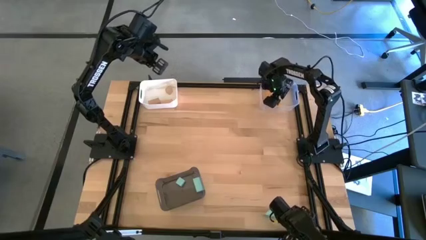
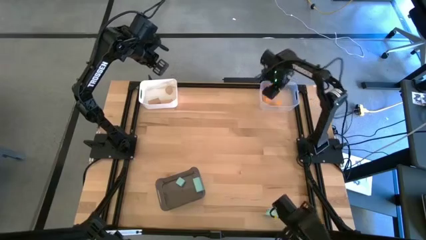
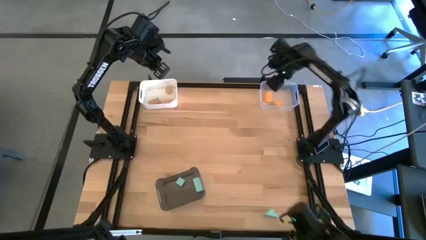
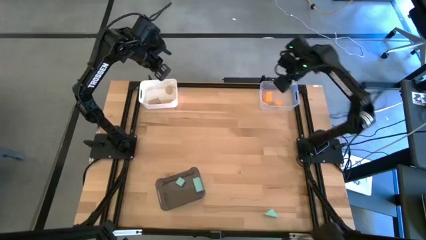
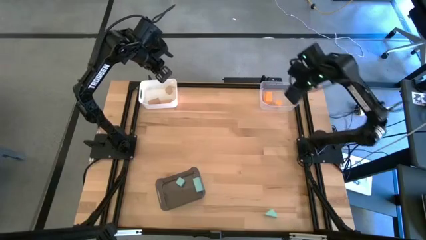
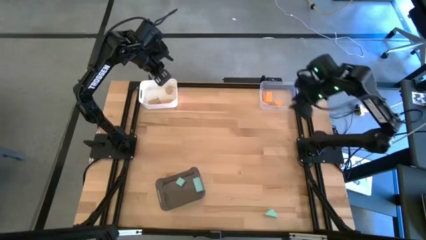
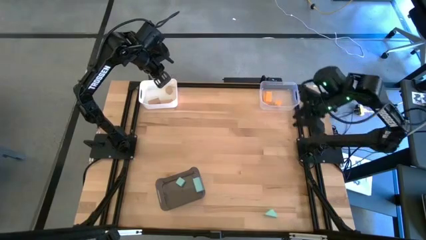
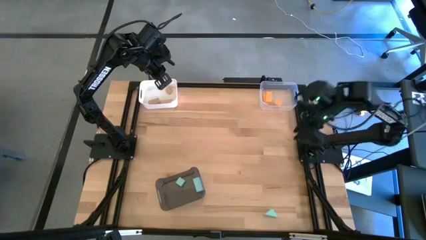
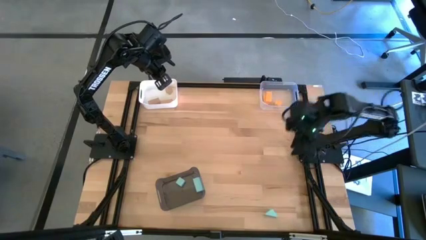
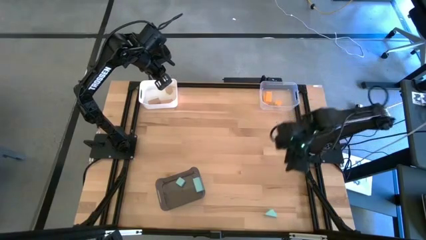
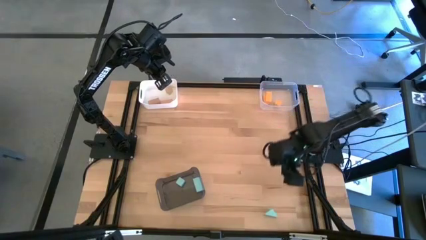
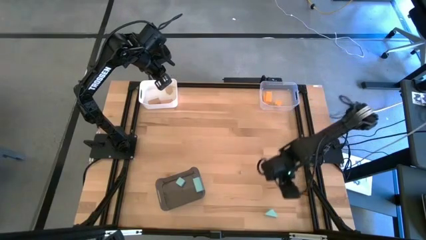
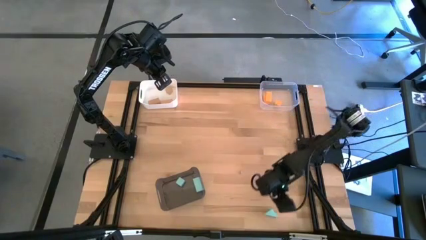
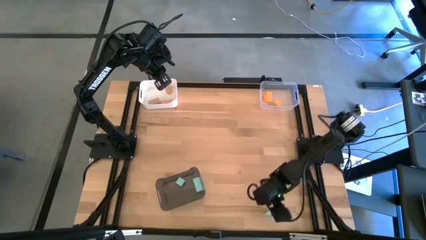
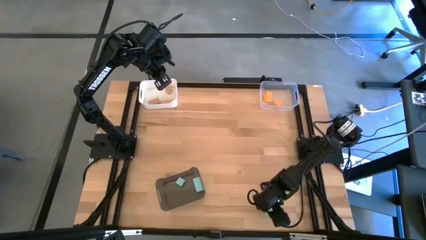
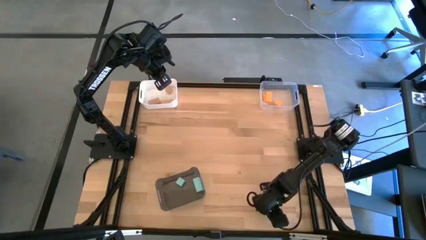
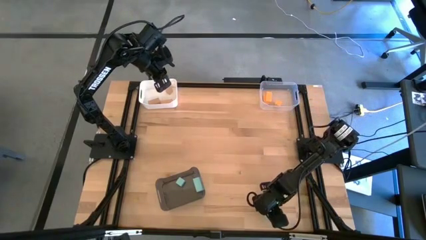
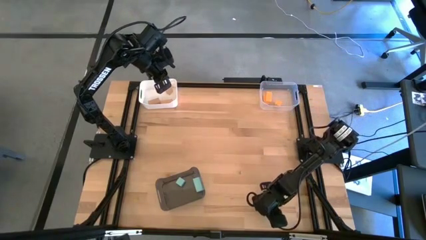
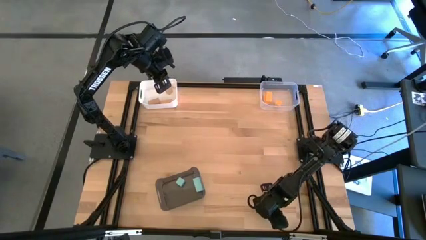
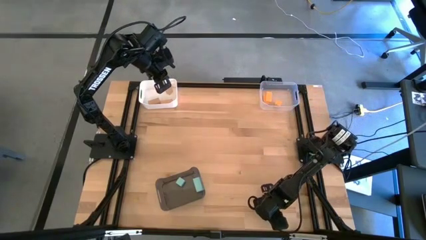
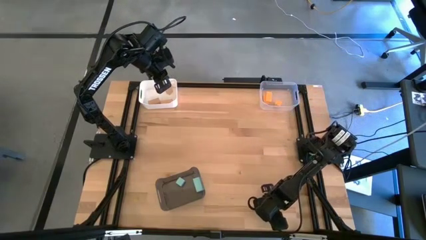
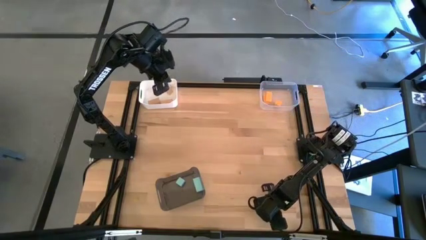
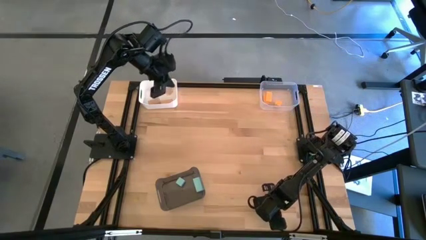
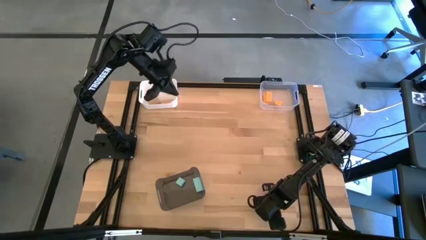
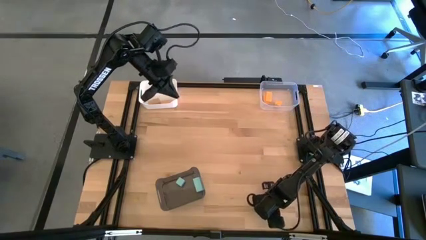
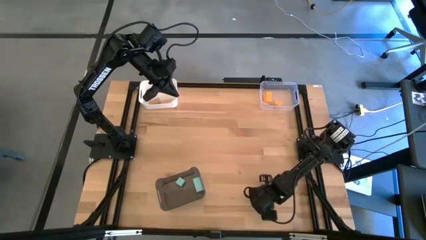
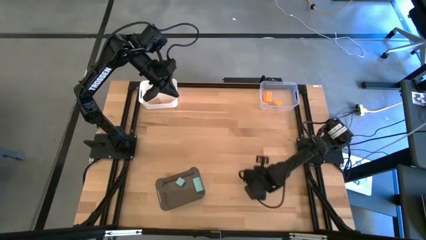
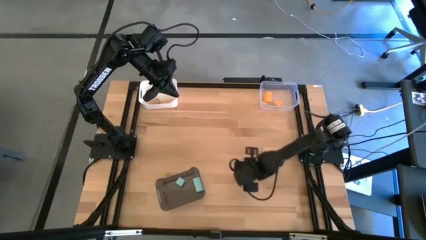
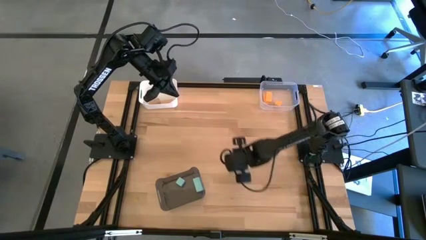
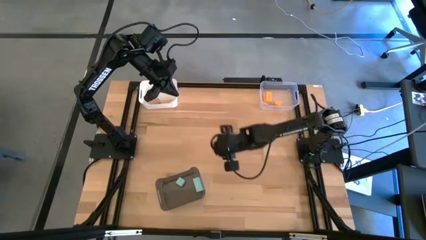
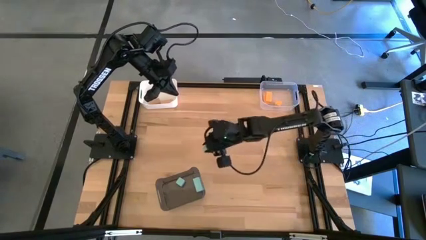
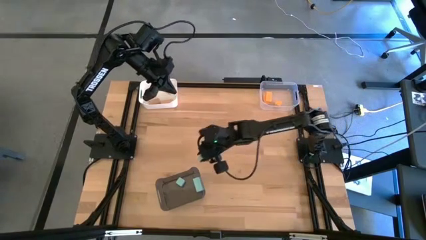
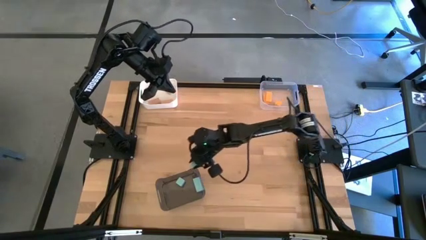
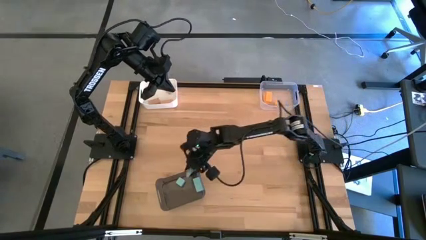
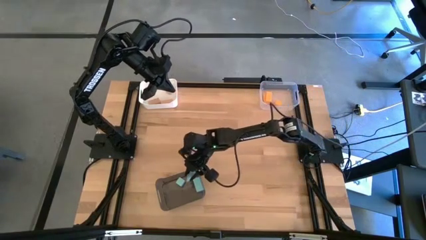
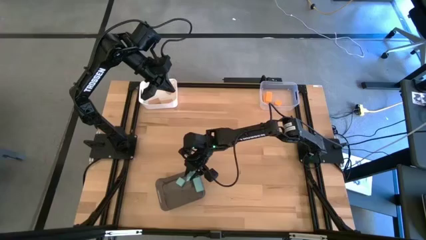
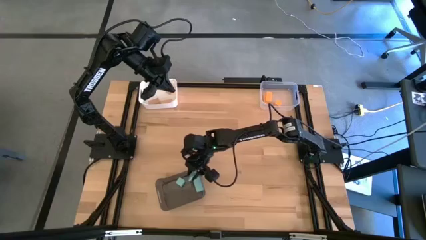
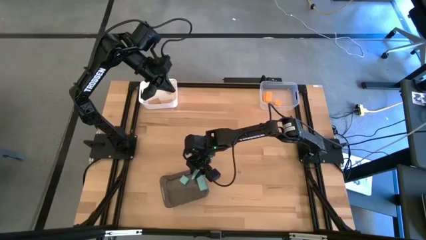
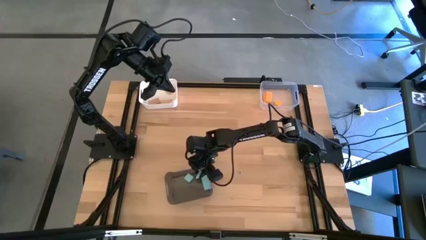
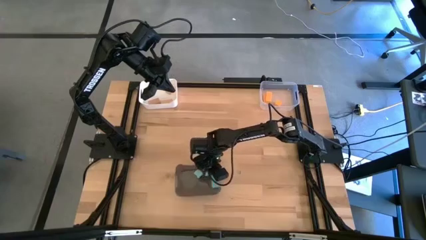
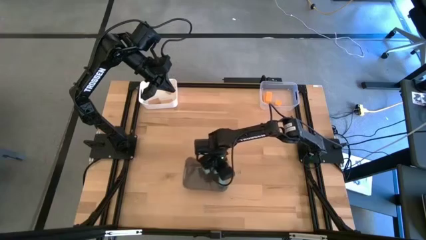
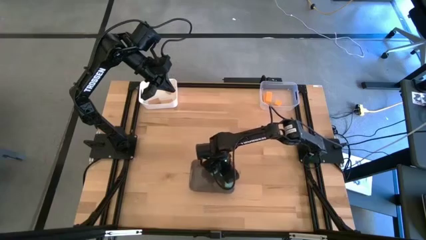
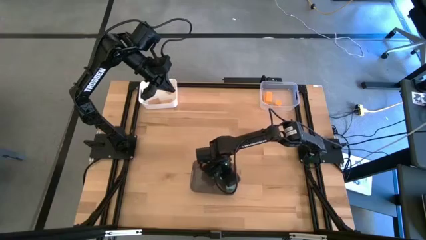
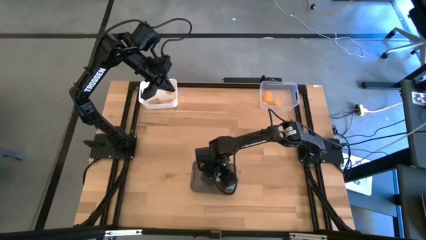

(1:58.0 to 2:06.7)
Task: Sort & place blocks by color
Put the blue block into the black bin

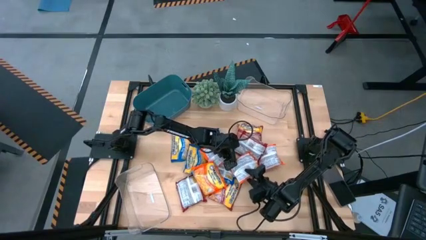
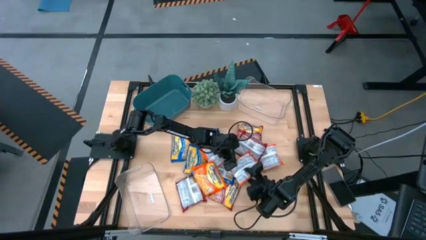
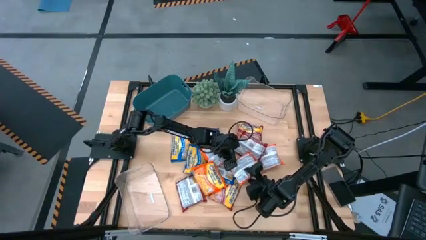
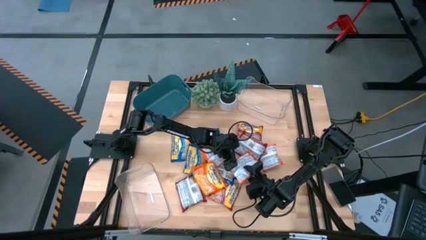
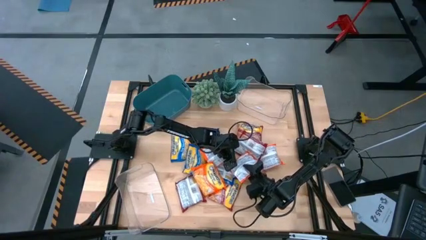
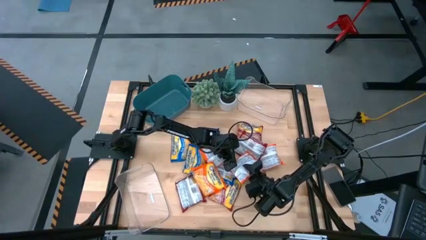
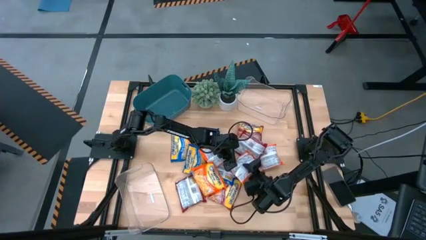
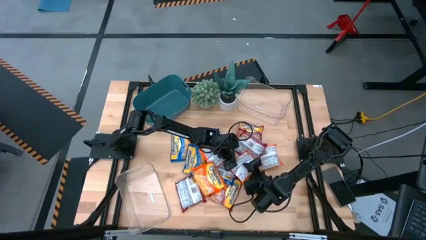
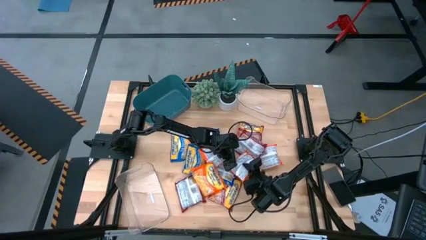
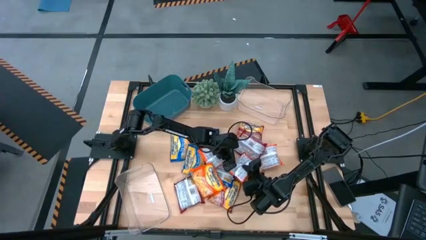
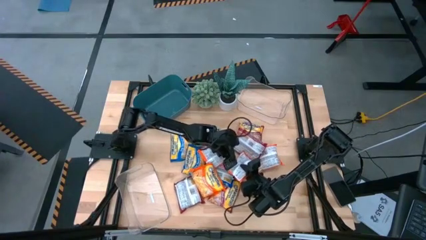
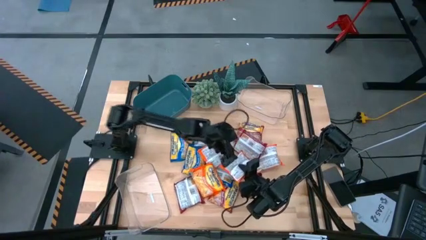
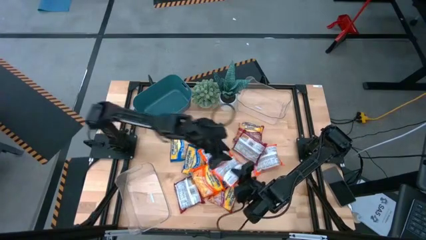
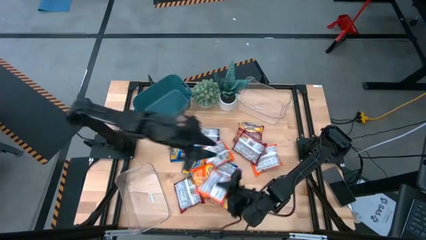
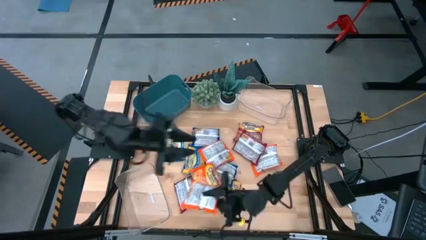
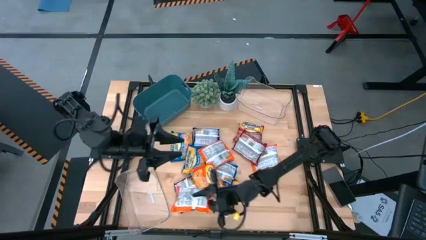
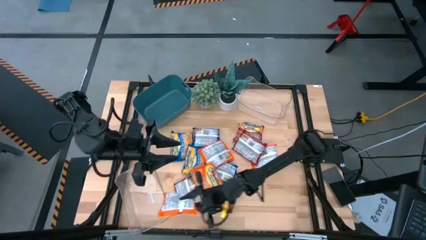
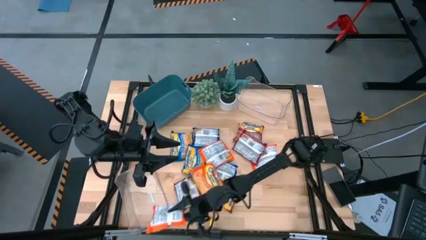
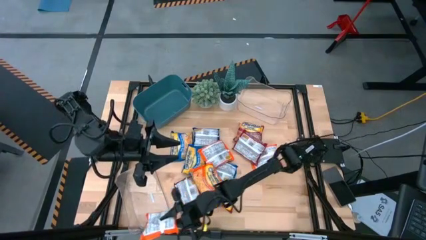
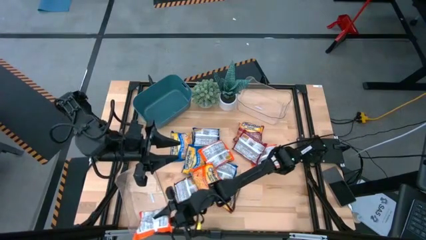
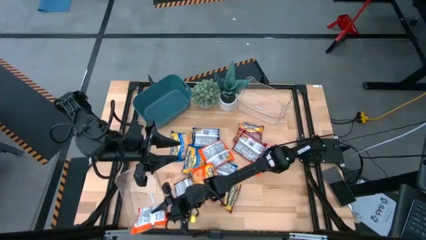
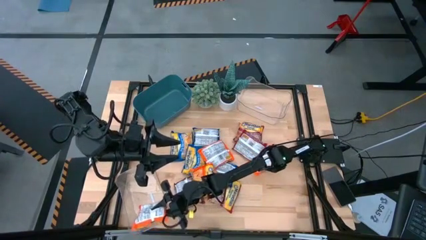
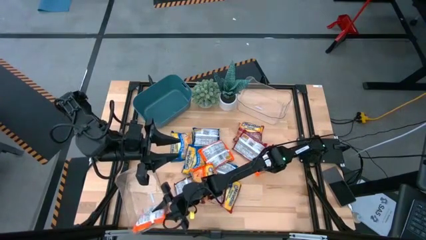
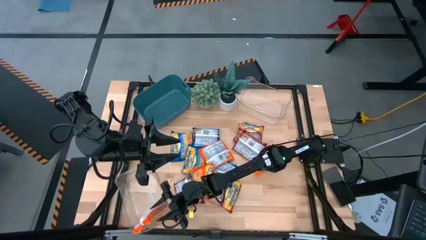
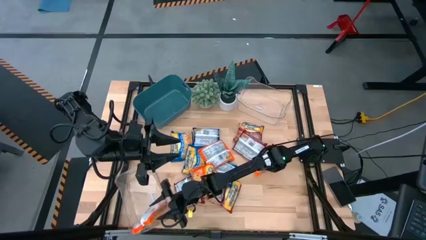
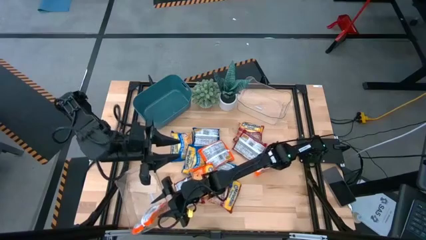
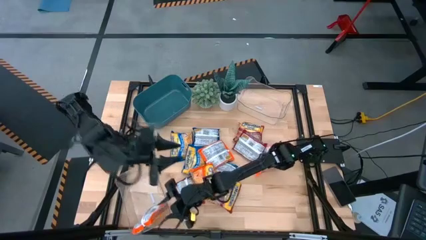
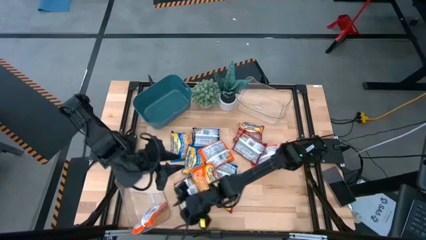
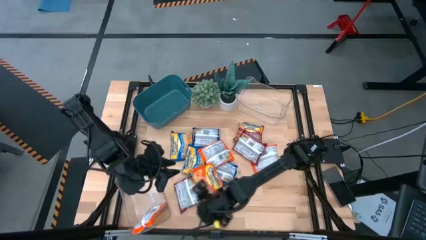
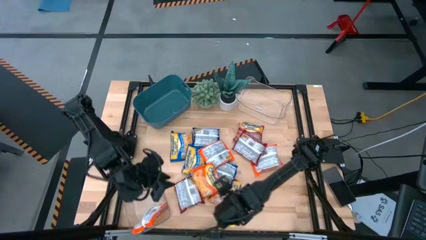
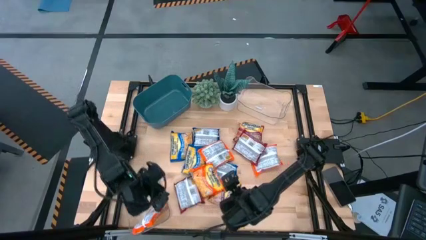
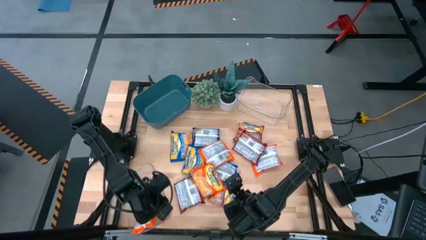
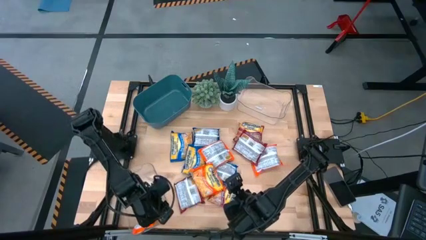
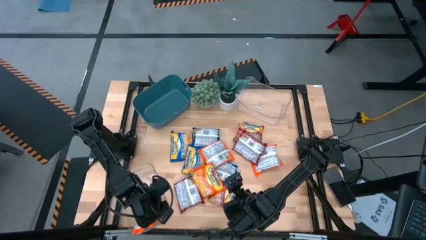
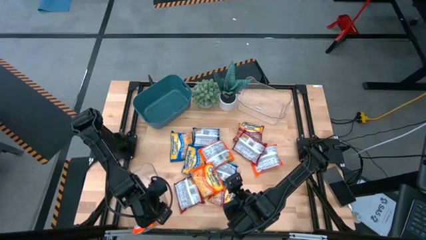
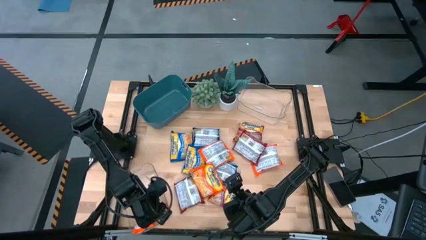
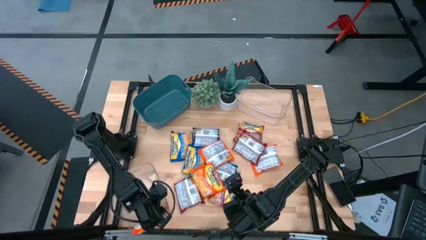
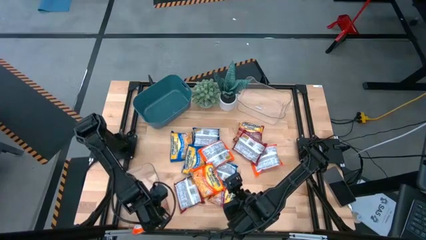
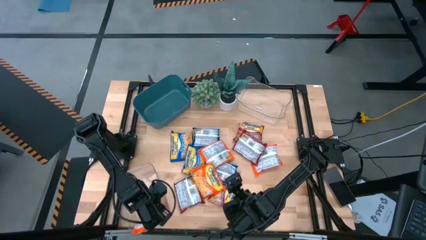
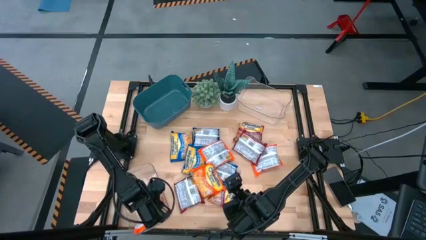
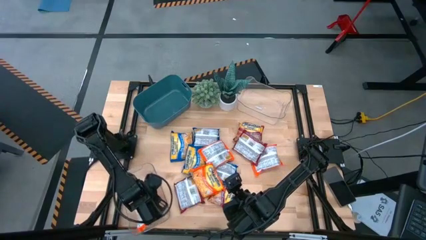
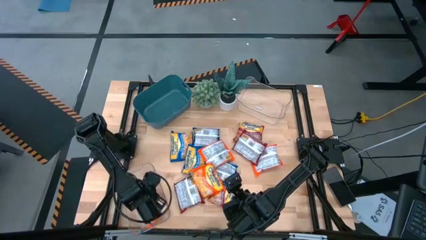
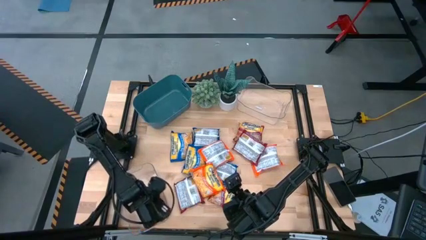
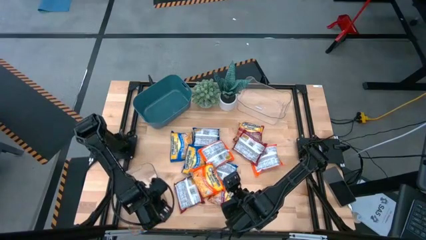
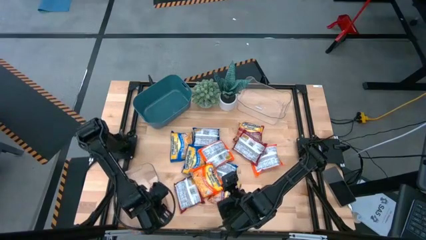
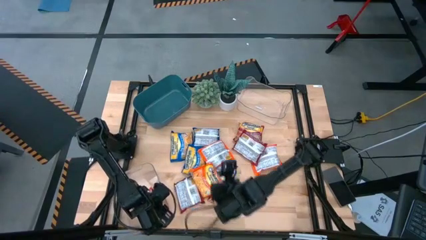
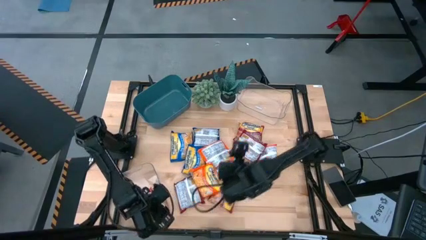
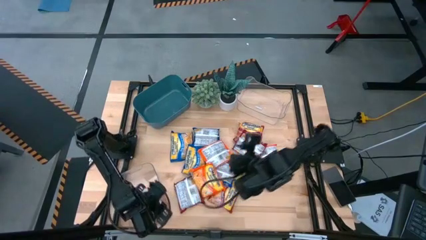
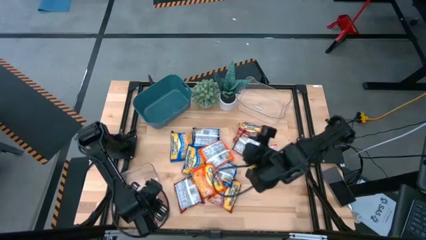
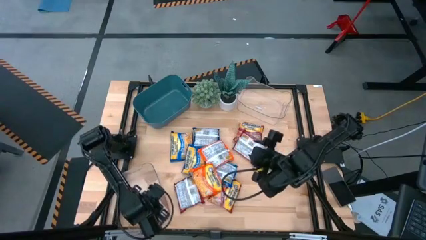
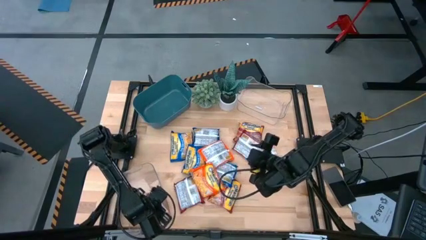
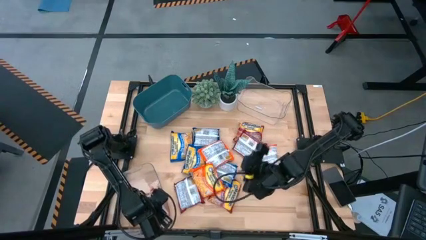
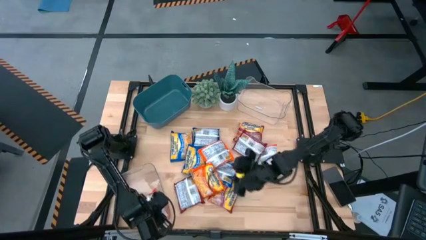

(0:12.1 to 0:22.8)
Task: Sort Maruchan noodles
Put the orange noodle pack into the bottom transparent bin
